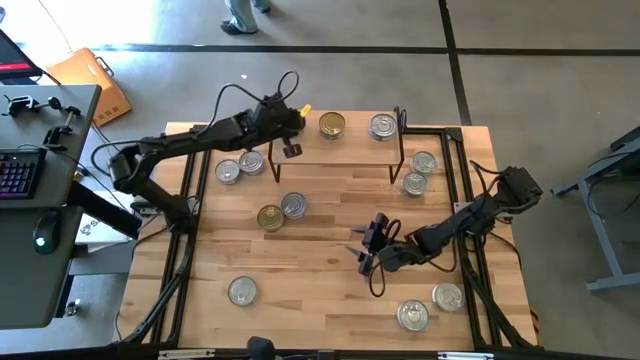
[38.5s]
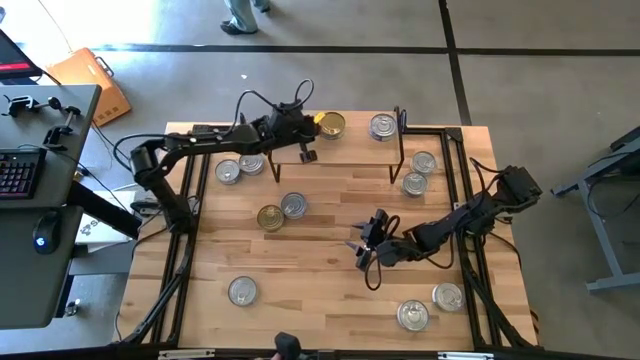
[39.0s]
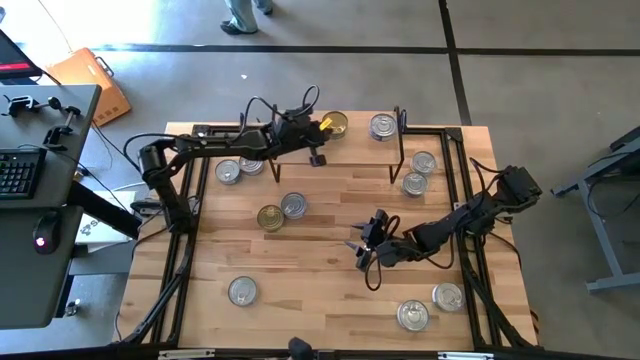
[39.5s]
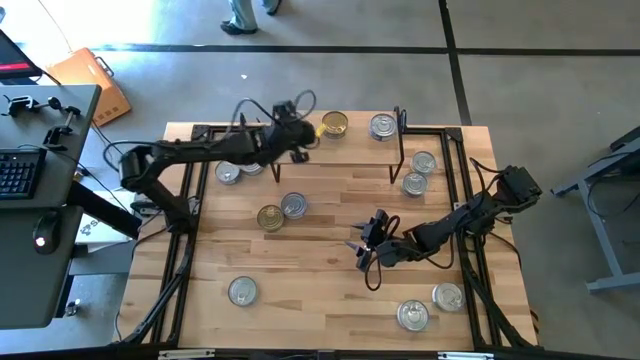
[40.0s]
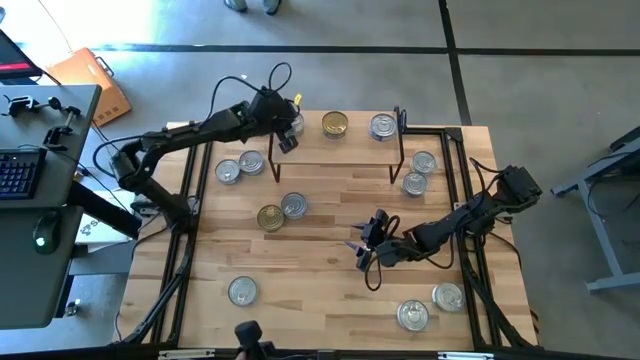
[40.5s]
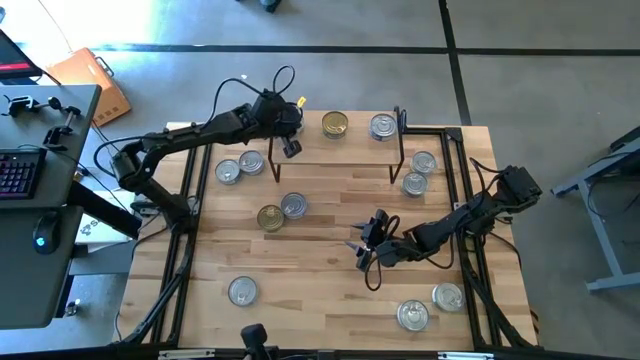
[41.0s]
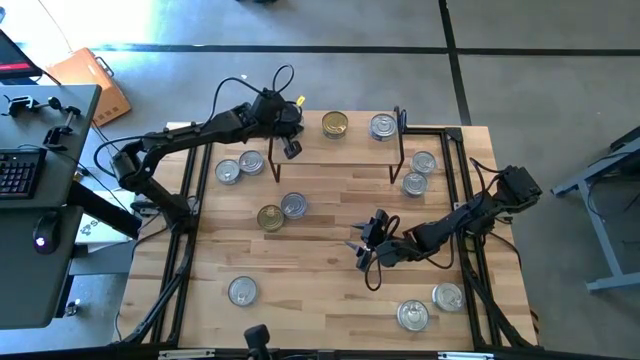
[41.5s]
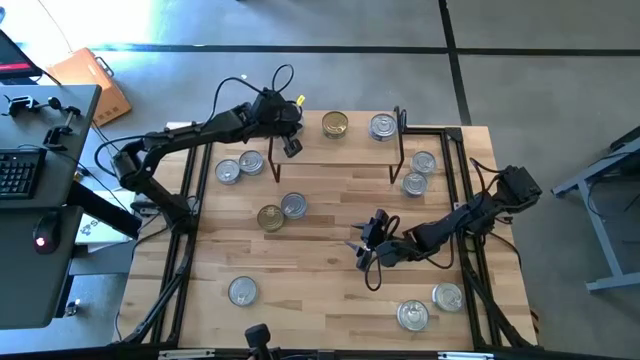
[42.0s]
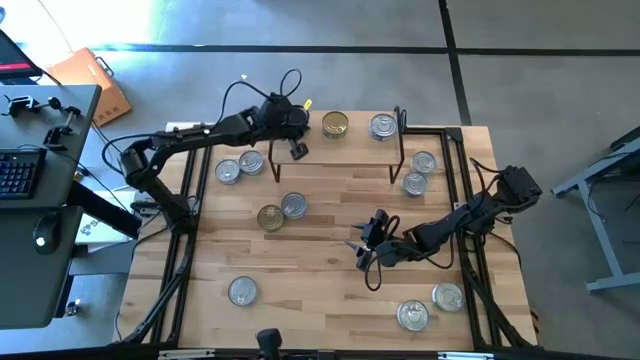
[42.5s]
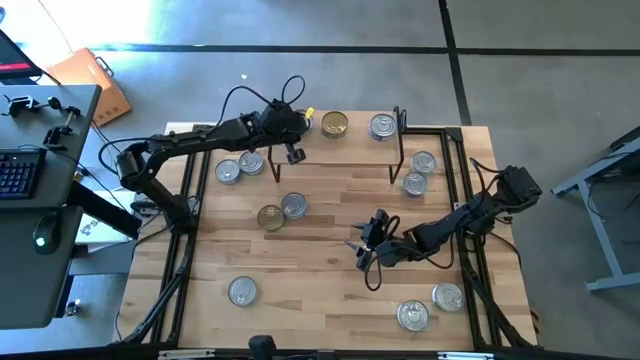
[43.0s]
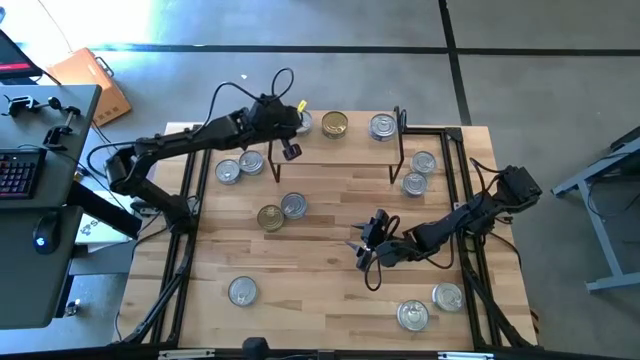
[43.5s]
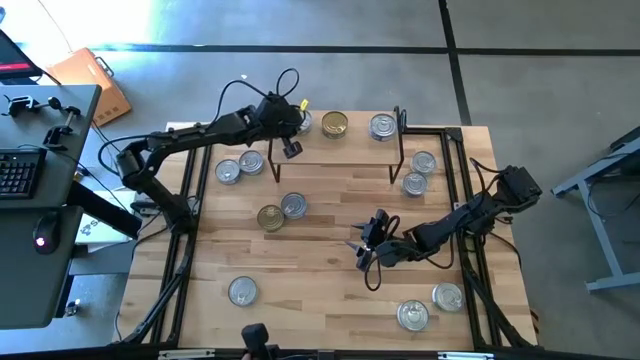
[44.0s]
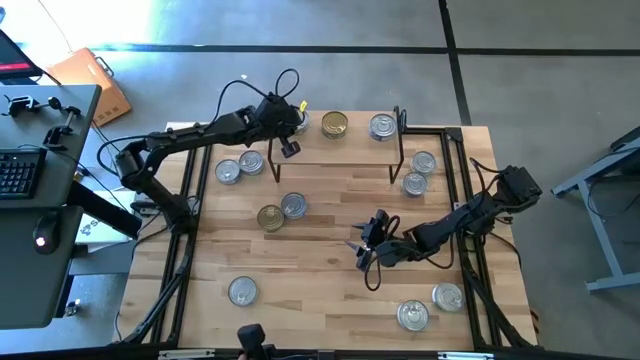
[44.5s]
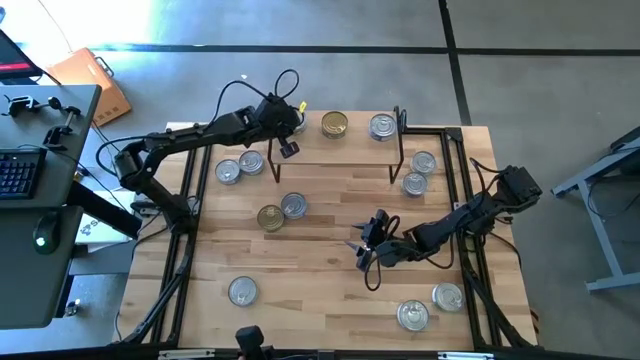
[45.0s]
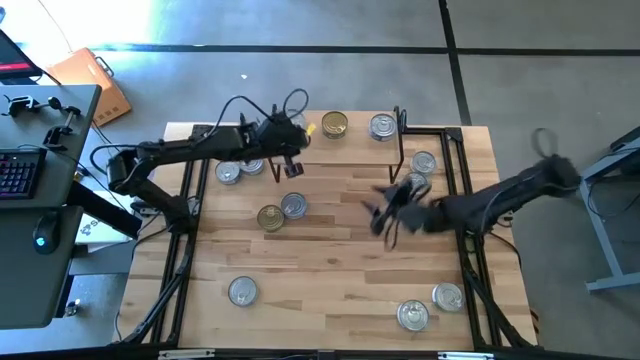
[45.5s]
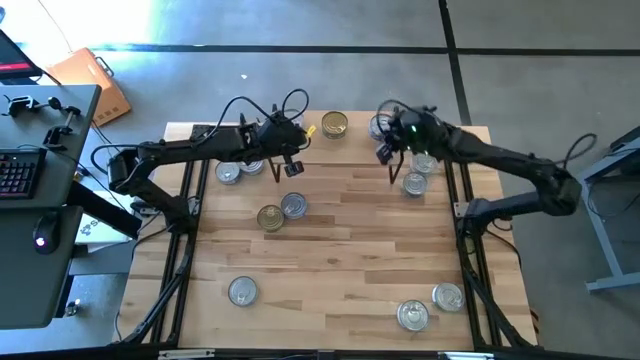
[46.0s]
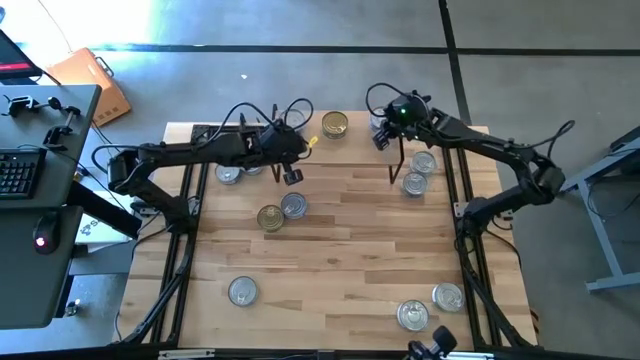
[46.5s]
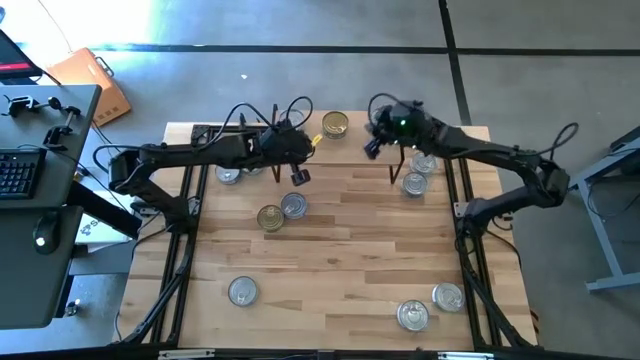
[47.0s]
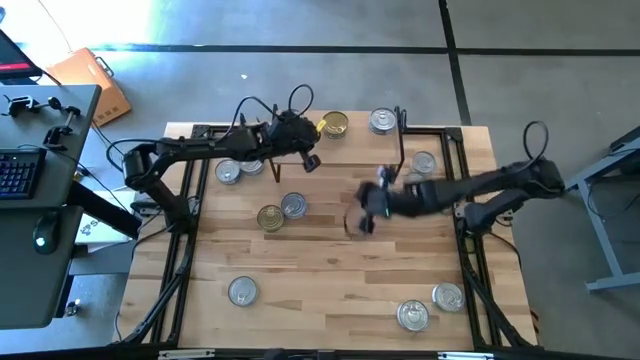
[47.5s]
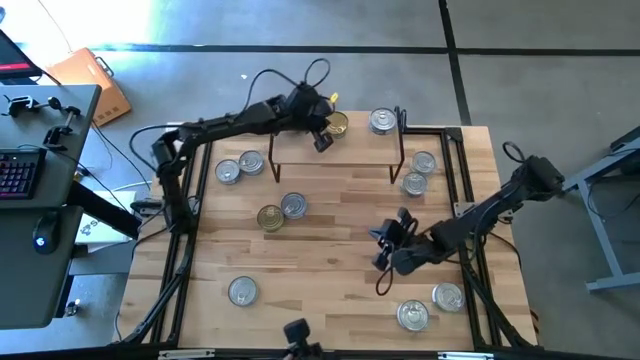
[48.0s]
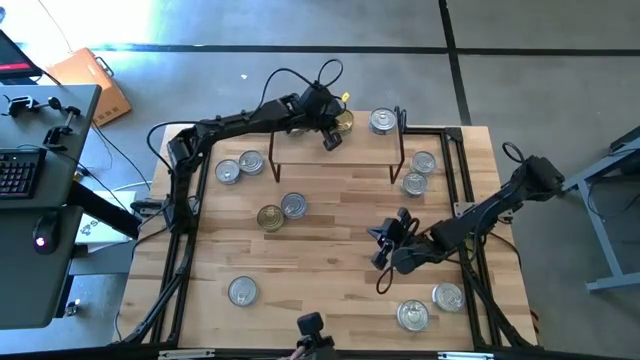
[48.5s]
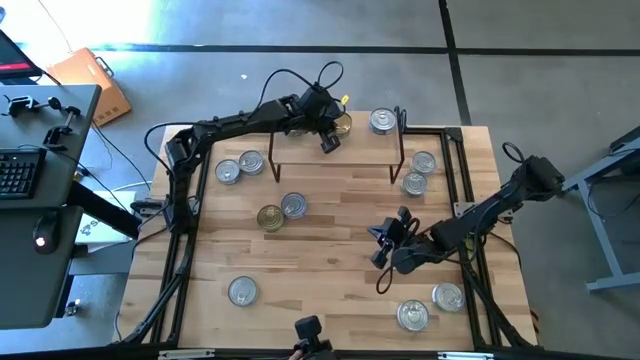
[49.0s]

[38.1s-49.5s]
Task: Stack canned seafood by type on shelf
Adjust the tuna cans on the shelf

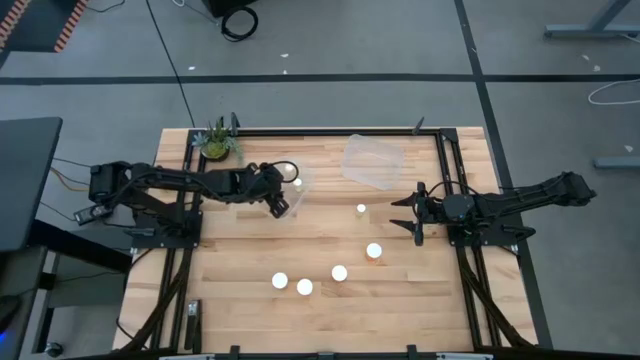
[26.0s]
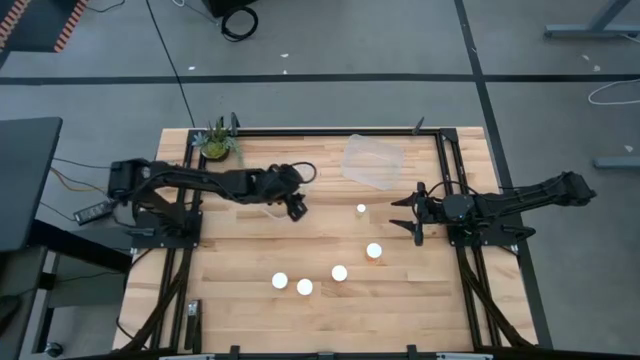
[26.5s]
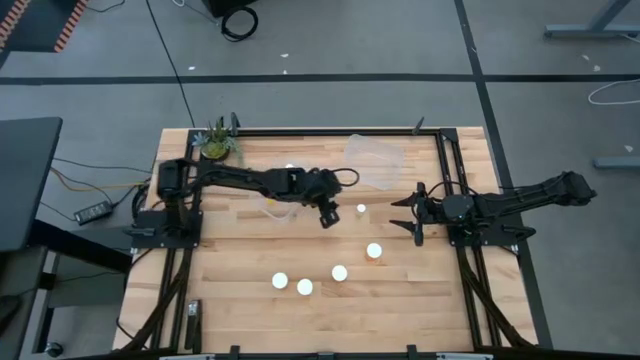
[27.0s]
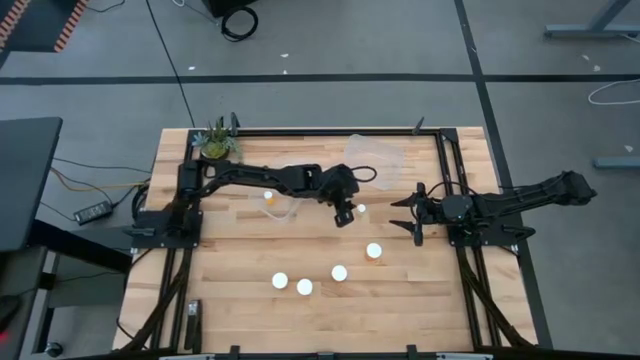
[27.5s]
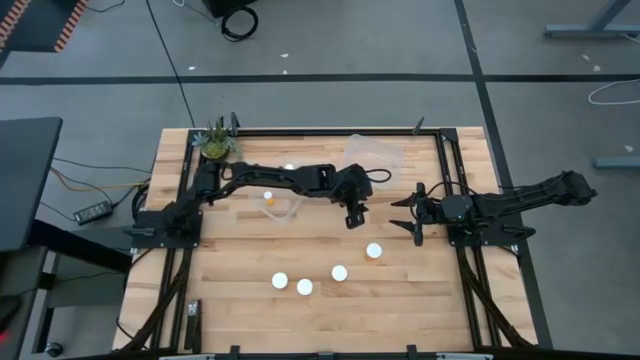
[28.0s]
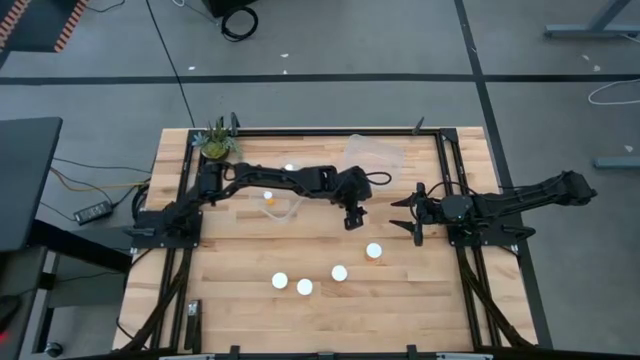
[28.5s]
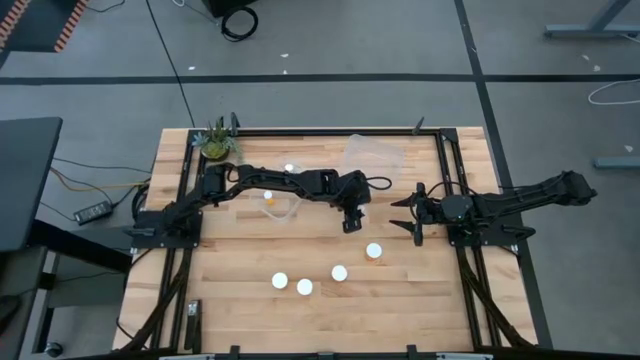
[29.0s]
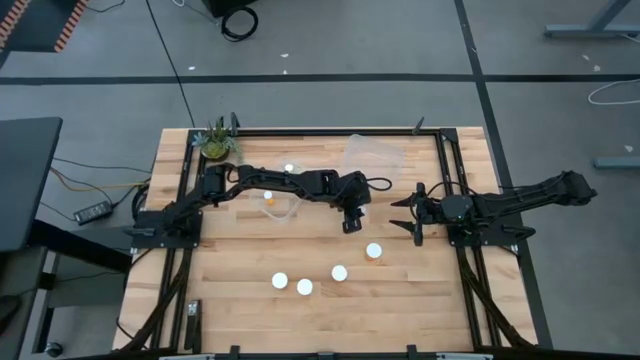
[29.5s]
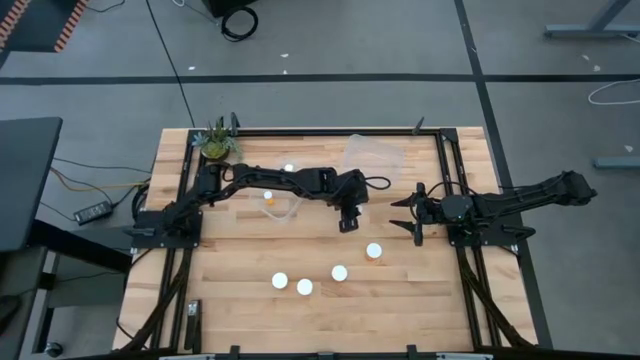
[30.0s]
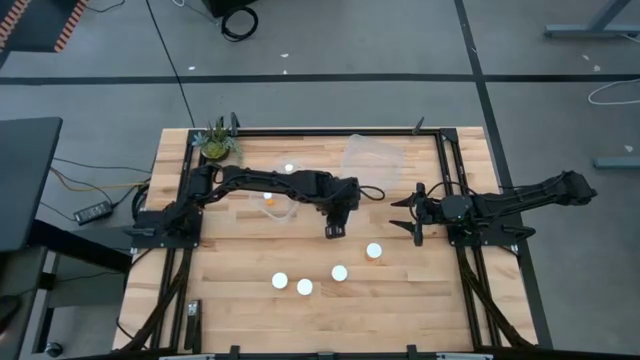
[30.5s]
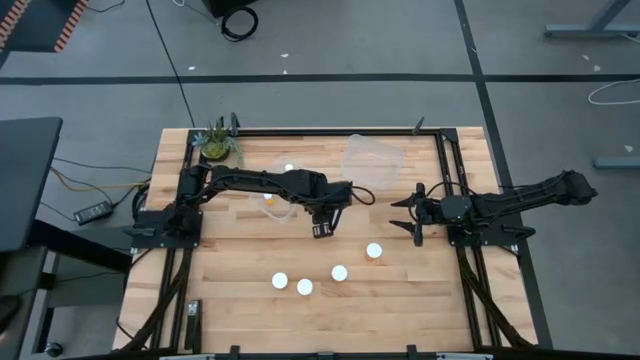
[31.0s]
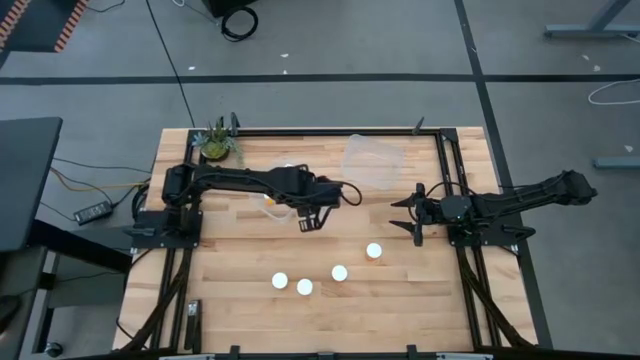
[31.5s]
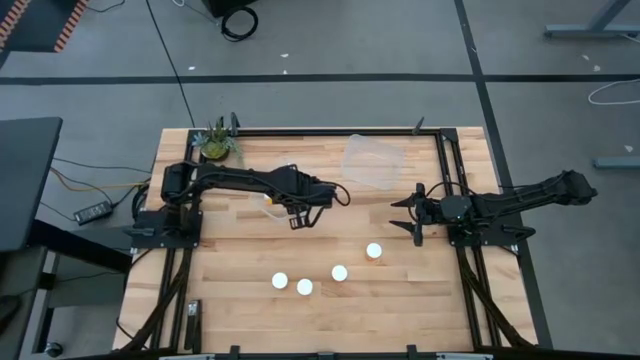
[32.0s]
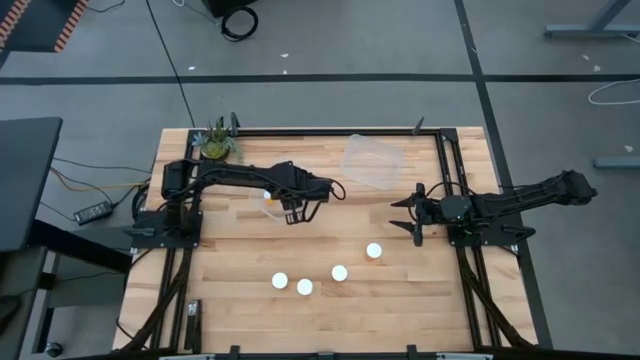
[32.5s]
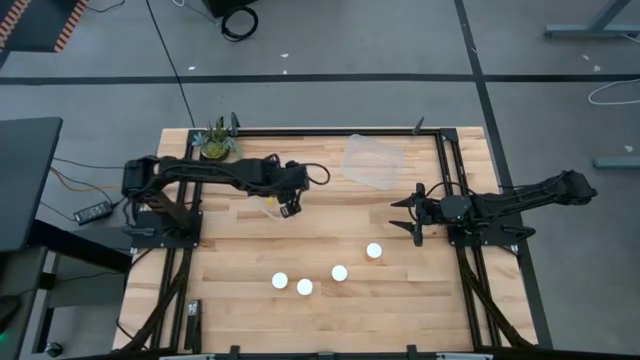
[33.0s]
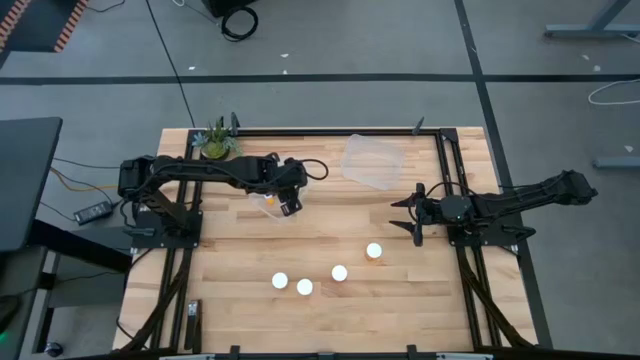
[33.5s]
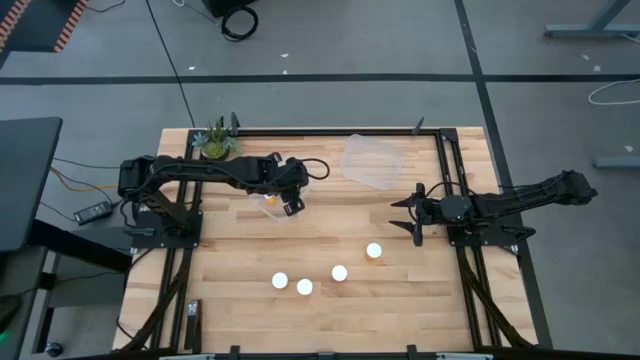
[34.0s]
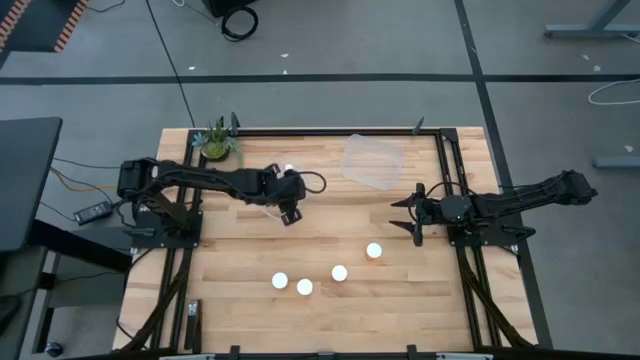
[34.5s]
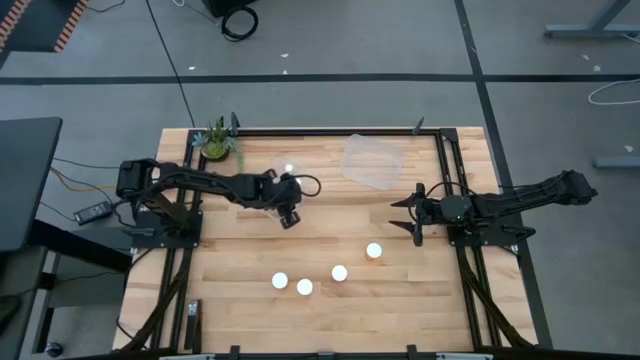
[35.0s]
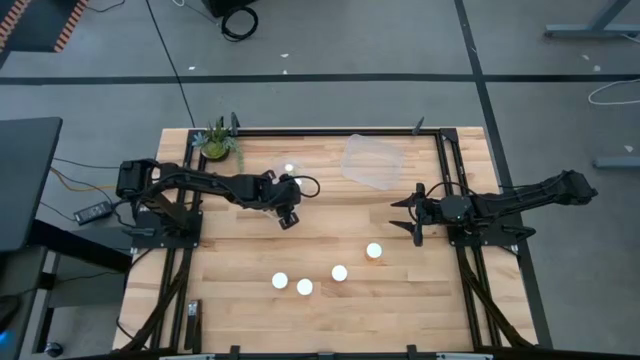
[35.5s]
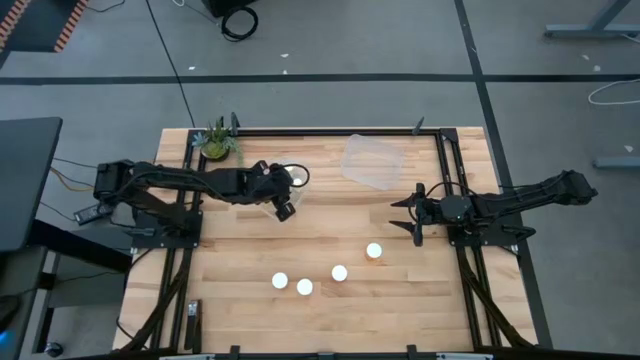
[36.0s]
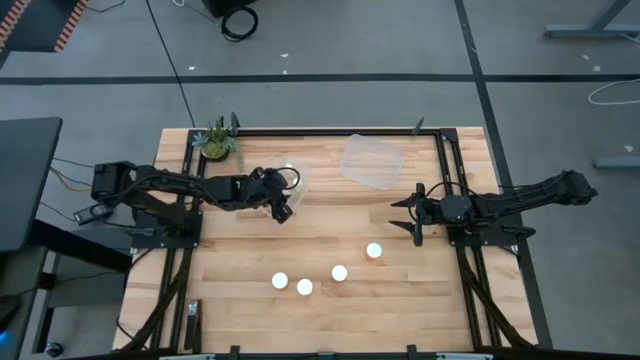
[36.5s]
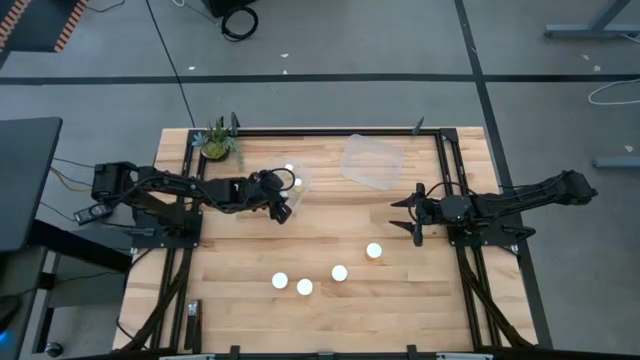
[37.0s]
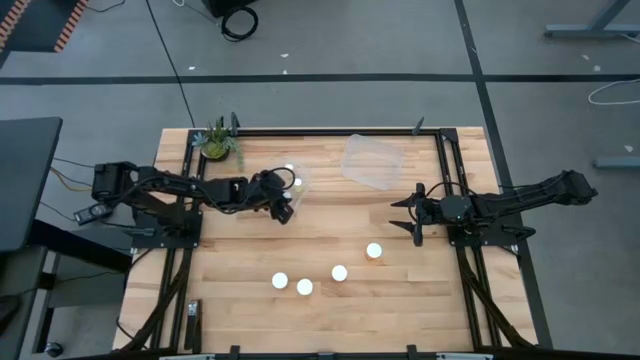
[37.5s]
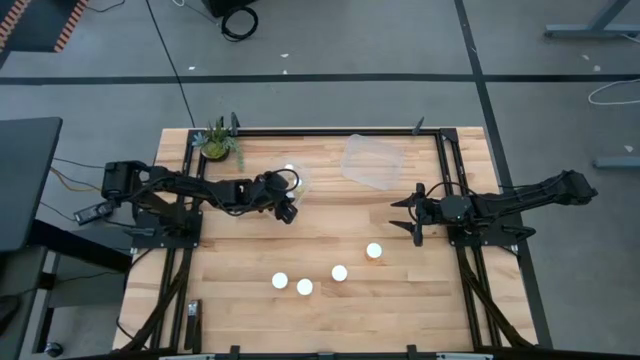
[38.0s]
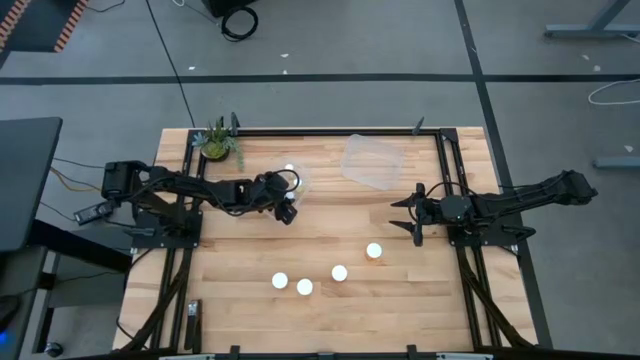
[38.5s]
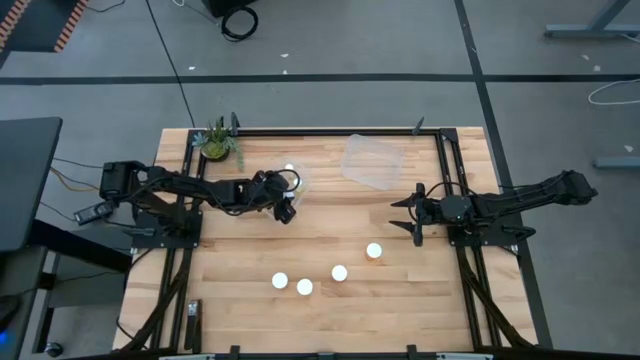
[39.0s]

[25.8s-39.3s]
Task: Pick and place medicine bottles into bin by pill shape (circle, oval)
Put the small yellow pill bottle into the left transparent bin
